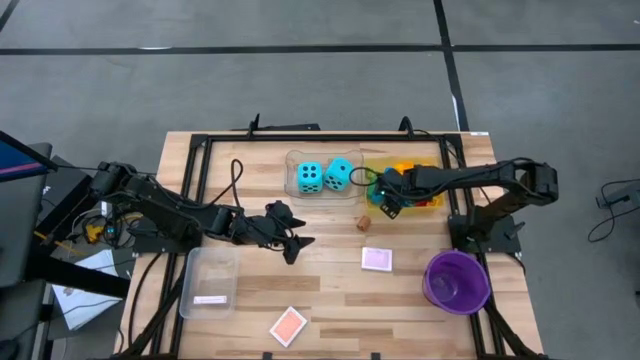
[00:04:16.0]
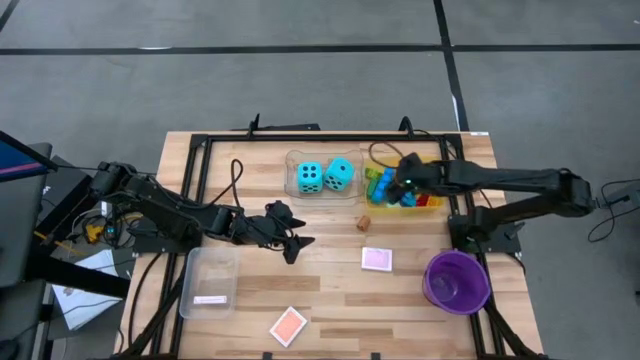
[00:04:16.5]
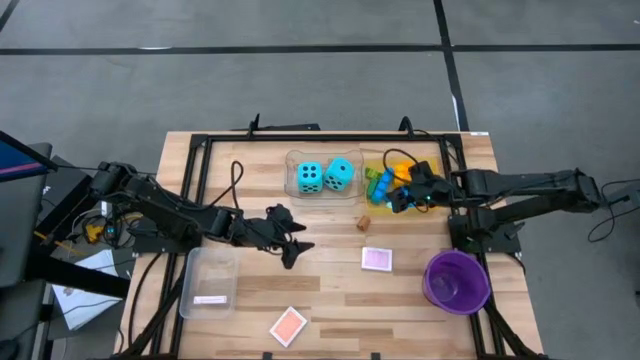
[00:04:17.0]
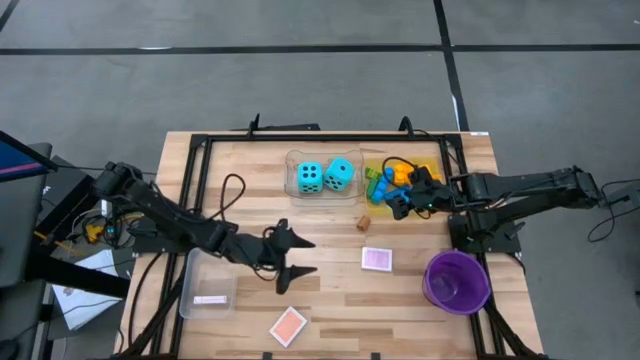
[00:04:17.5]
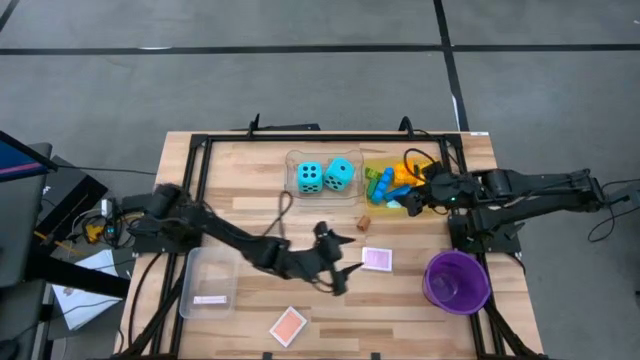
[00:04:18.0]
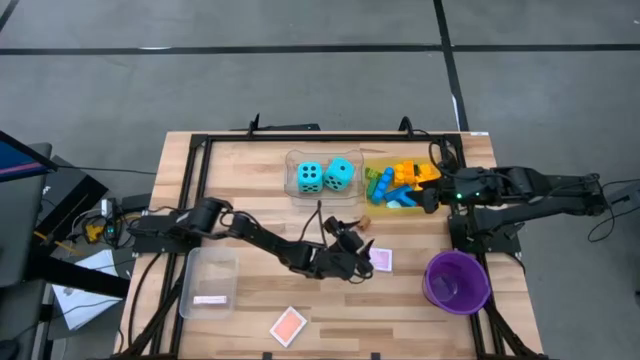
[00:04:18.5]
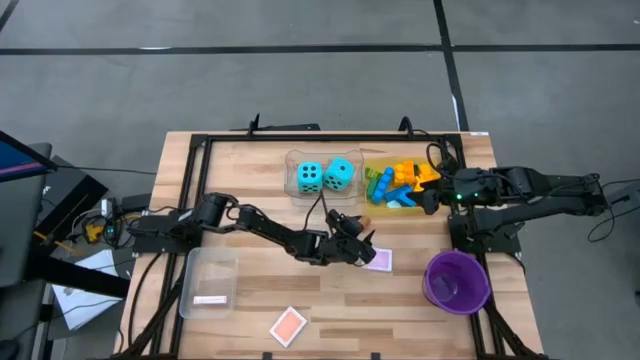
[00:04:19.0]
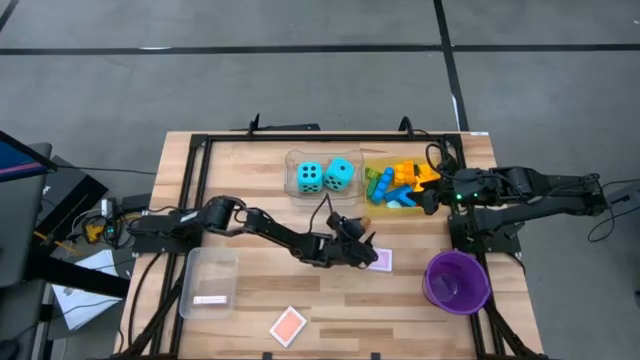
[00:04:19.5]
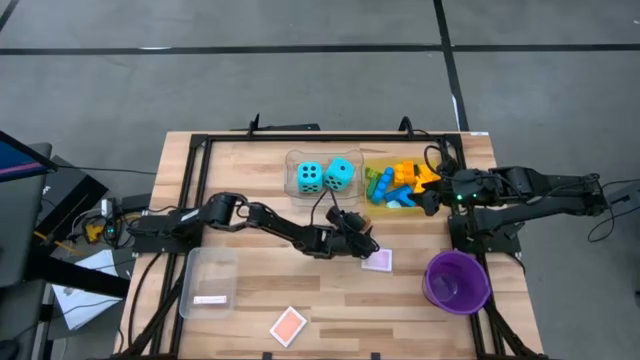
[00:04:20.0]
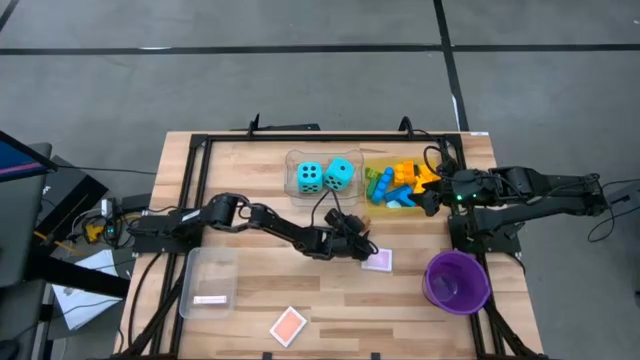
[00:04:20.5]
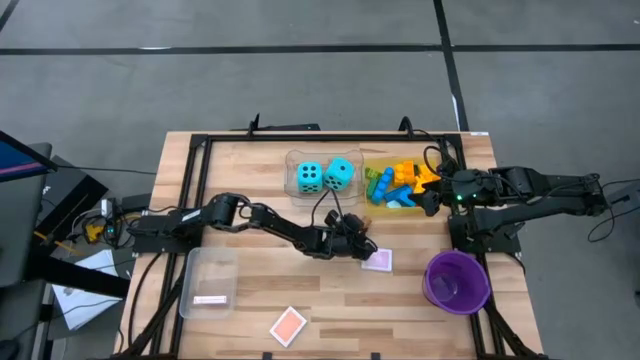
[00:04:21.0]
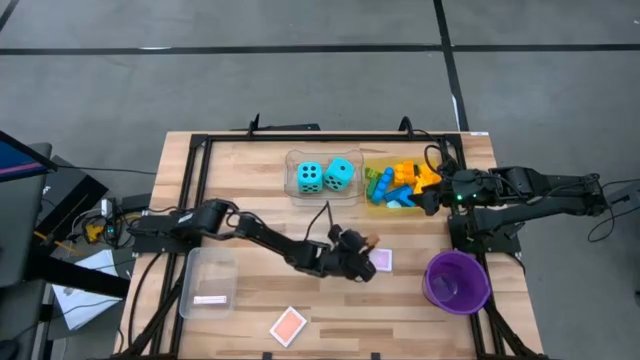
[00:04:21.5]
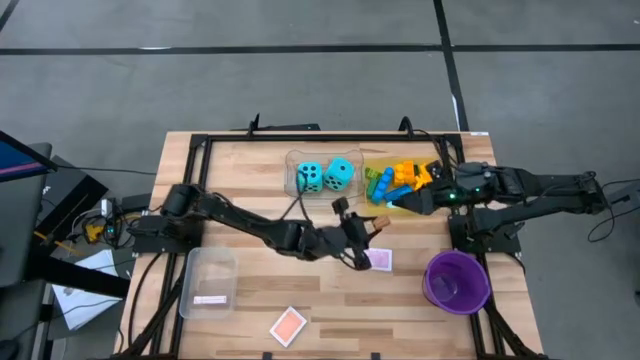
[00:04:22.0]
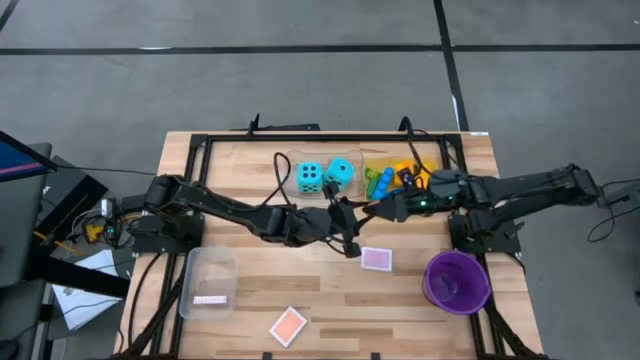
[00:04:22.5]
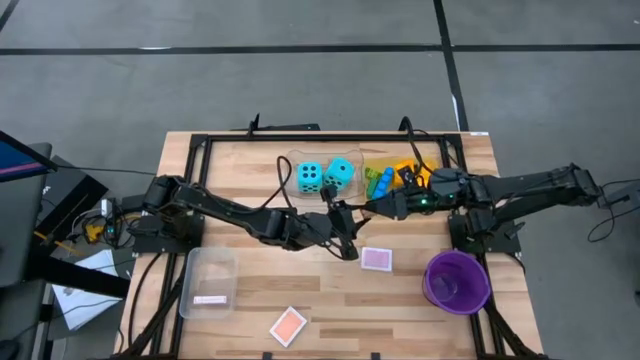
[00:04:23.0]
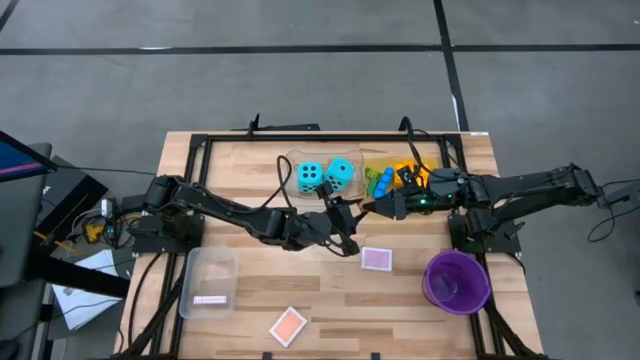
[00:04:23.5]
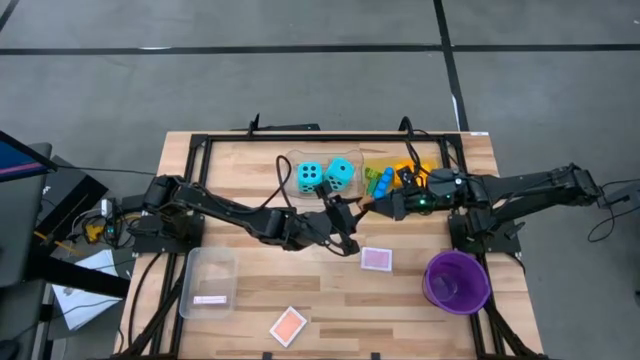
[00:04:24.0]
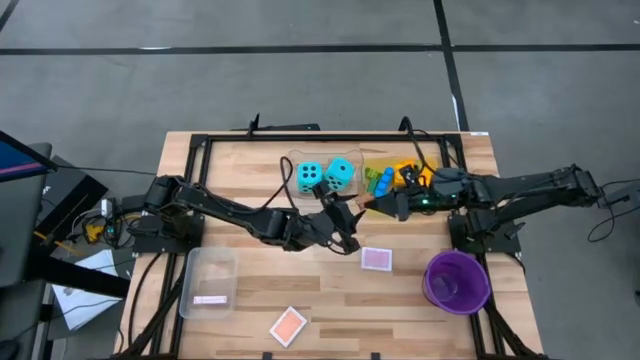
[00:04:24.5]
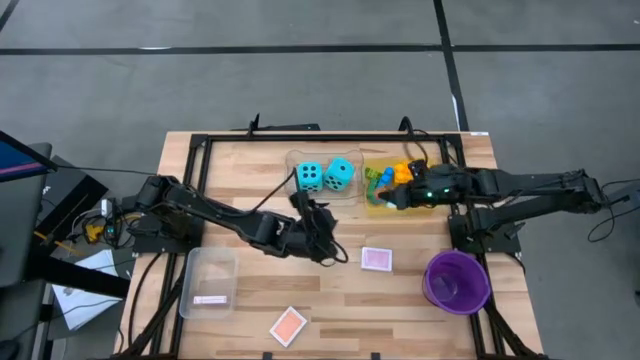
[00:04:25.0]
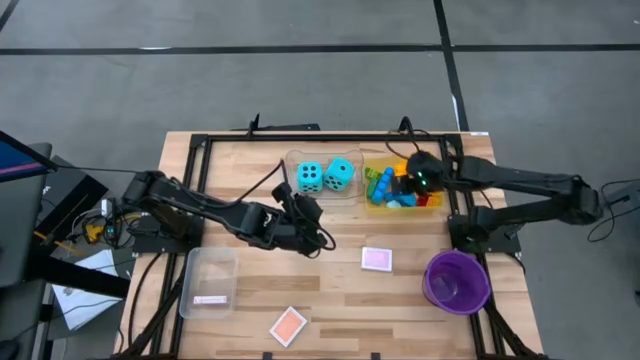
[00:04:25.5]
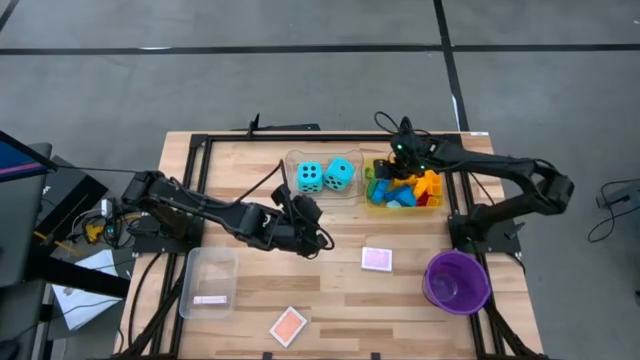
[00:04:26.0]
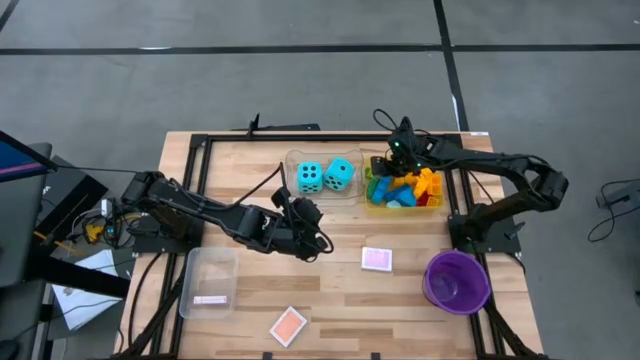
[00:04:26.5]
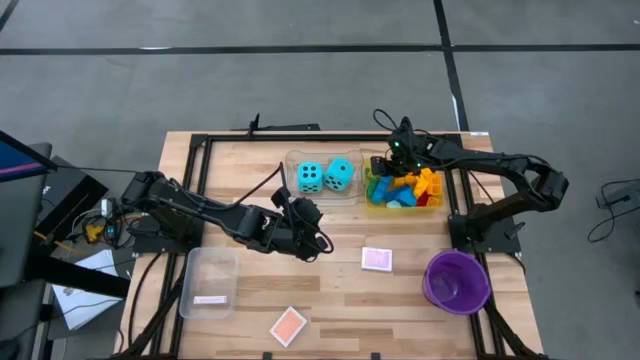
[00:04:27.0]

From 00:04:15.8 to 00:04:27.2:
Task: Pick & Place Toys
Put the brown game piece into the yellow bin

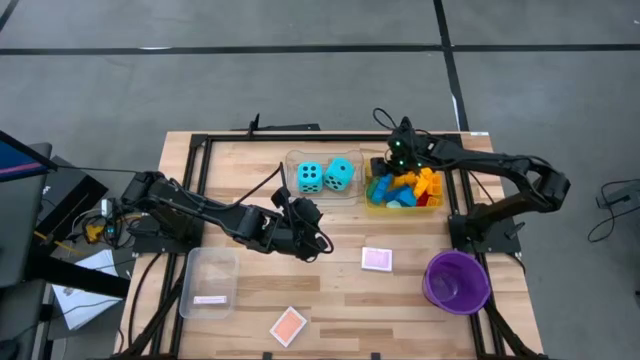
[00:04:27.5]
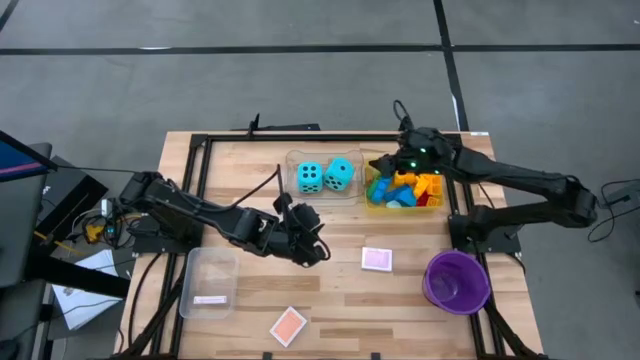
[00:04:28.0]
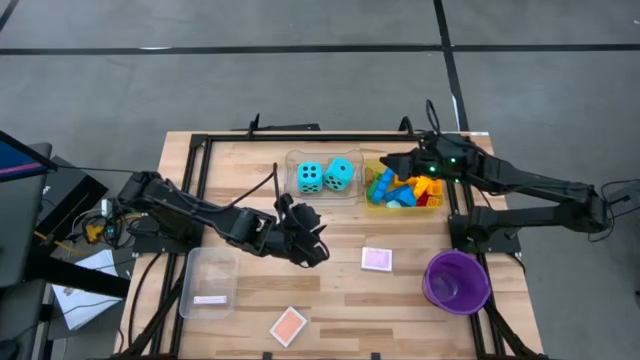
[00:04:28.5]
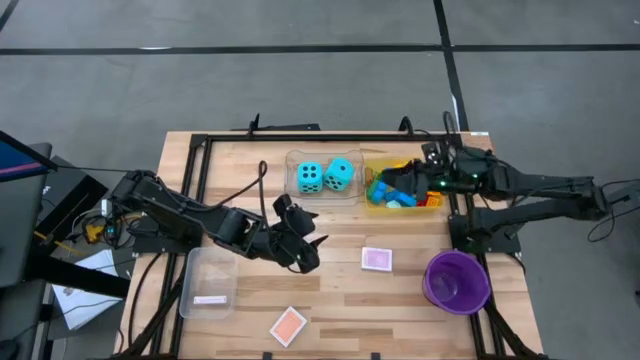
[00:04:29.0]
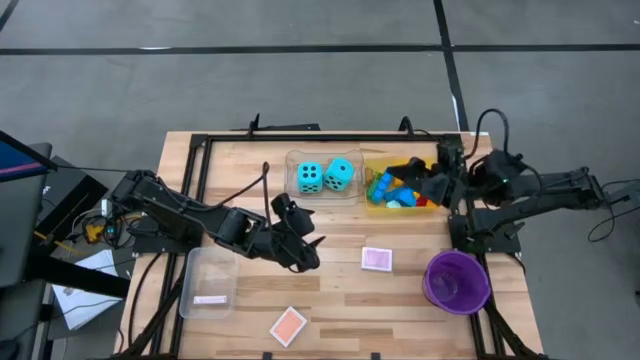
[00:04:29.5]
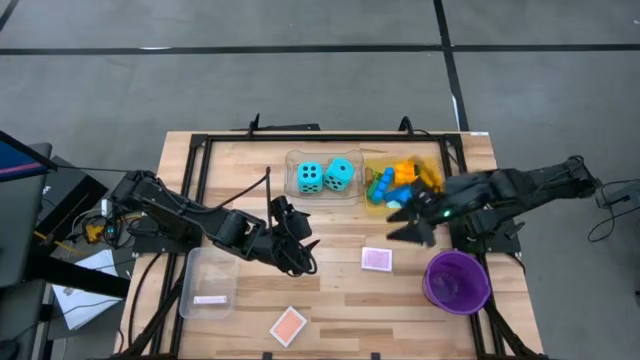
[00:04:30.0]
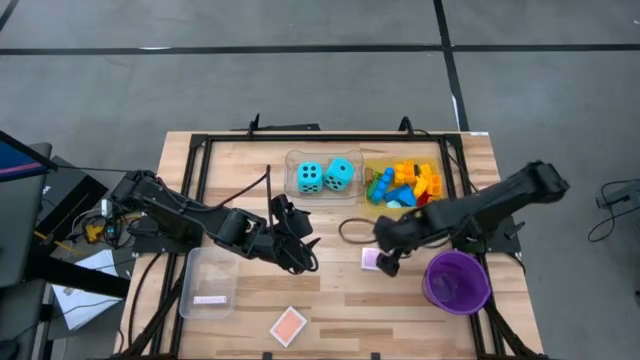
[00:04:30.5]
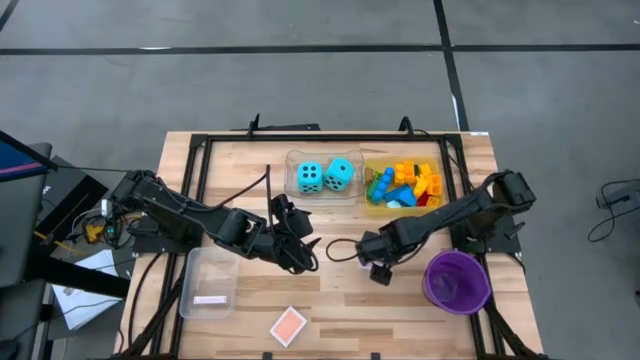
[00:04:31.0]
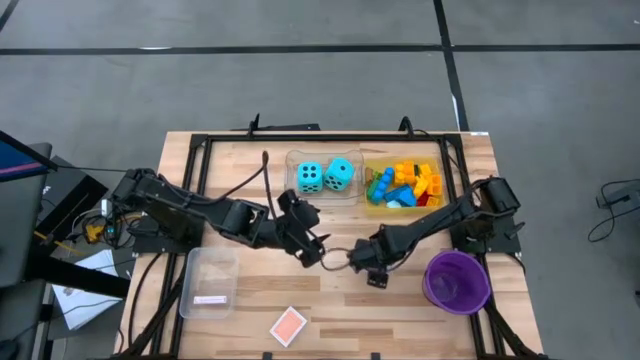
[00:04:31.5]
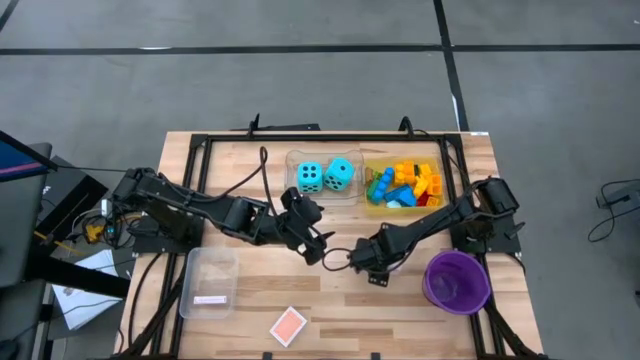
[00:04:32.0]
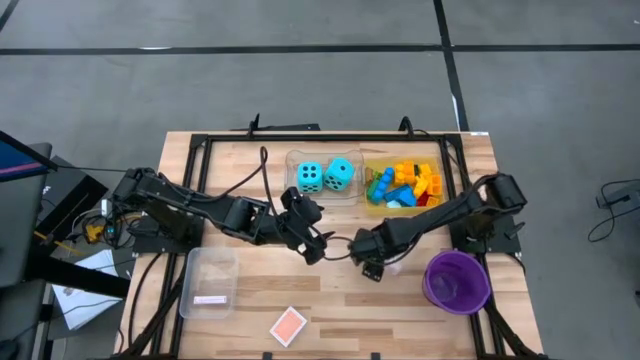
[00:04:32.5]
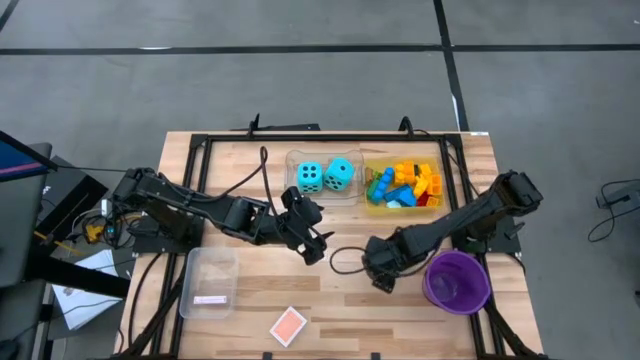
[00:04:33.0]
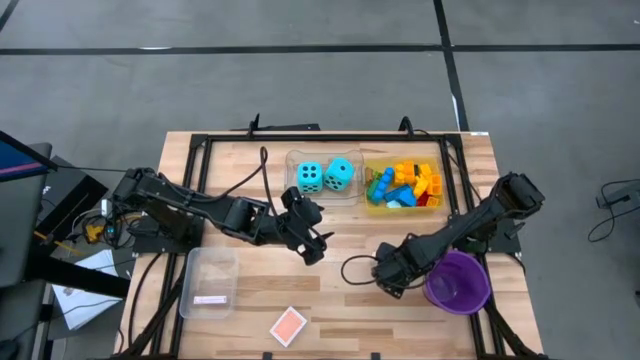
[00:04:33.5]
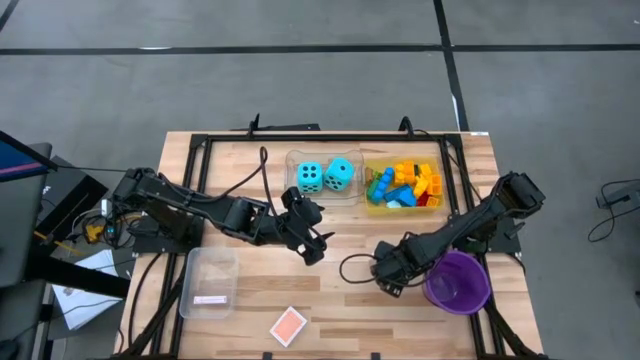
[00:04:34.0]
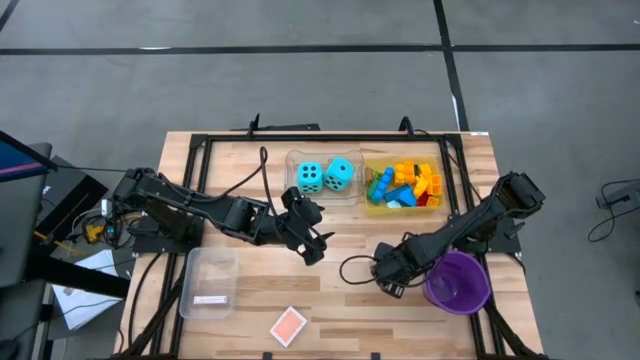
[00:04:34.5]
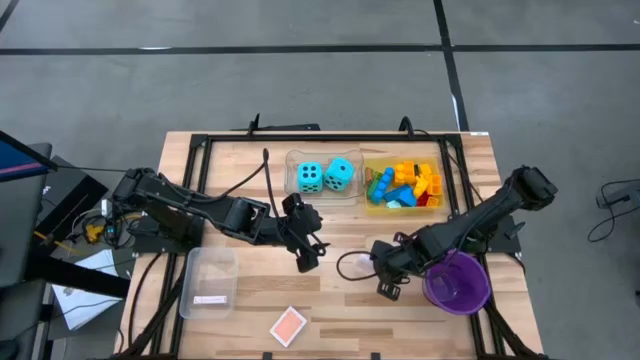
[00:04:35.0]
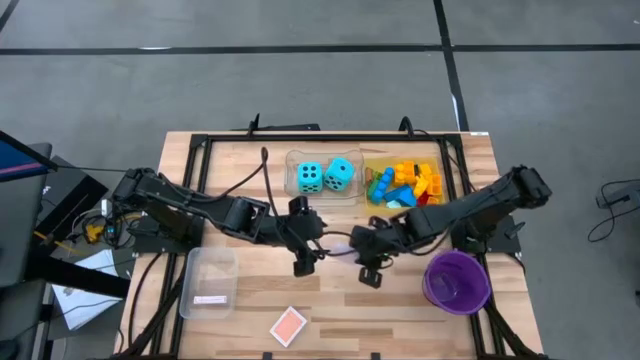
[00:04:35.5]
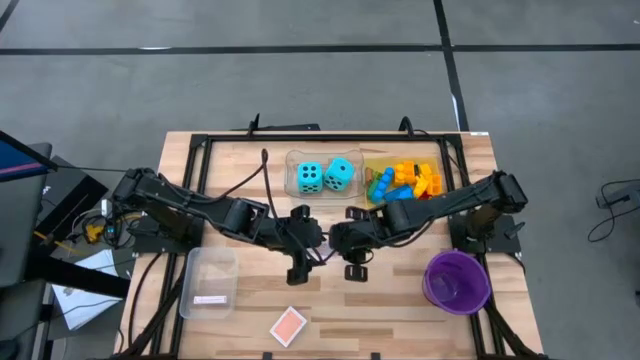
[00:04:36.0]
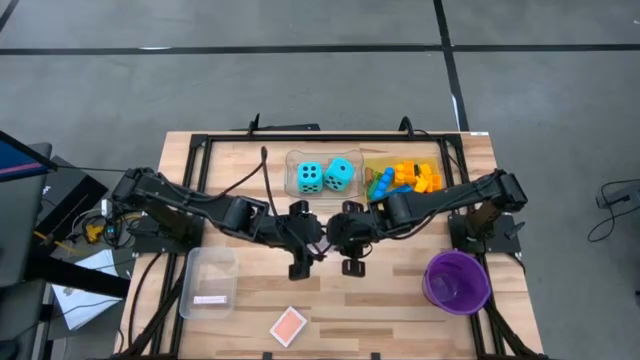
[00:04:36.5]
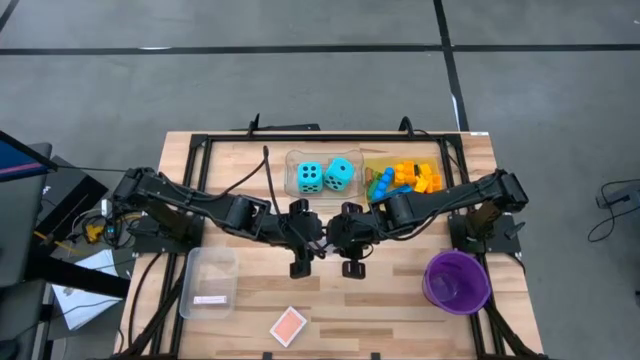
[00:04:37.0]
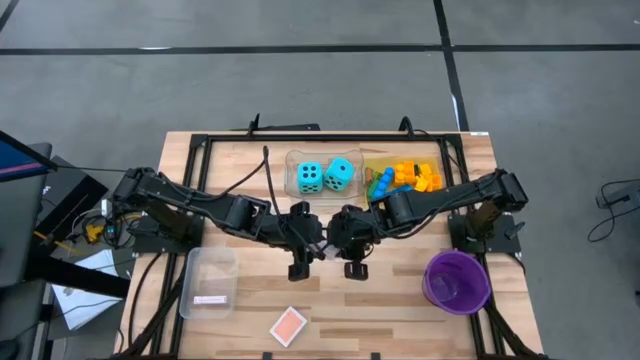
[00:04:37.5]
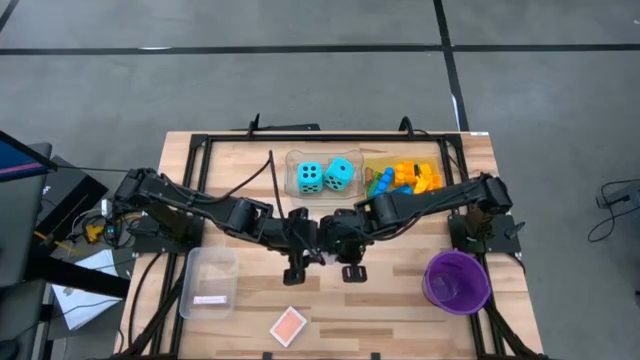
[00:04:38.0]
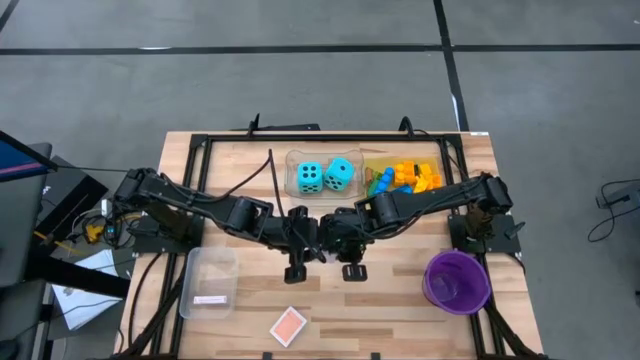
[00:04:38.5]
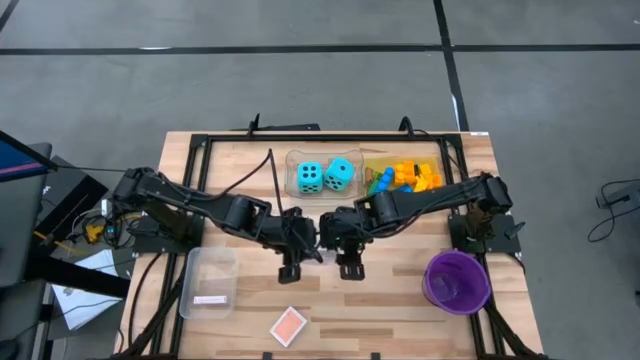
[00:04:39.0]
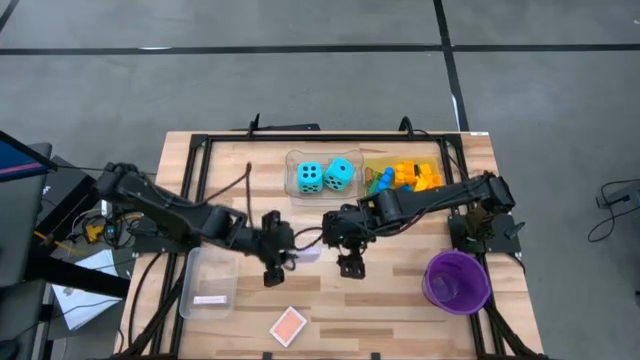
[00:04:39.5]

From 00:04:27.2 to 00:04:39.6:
Put the pink deck of cards into the white transparent bin
